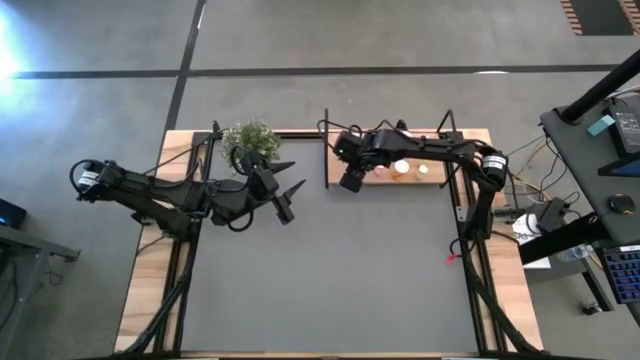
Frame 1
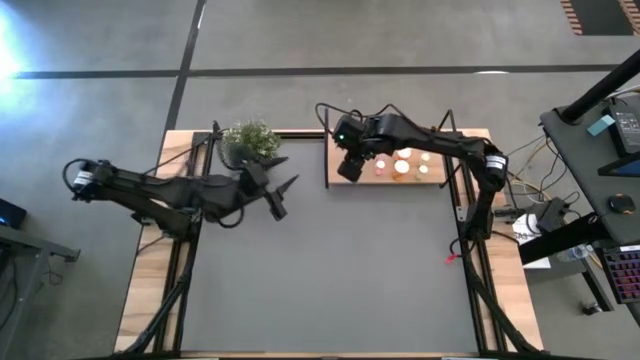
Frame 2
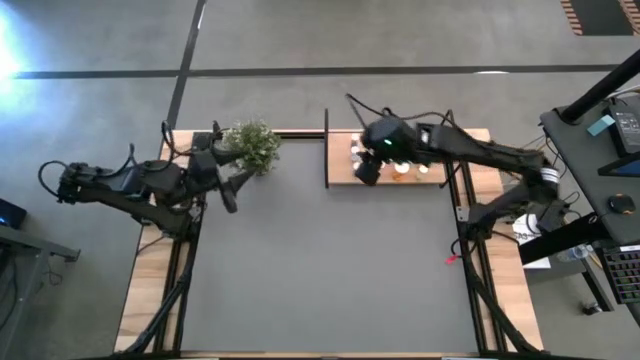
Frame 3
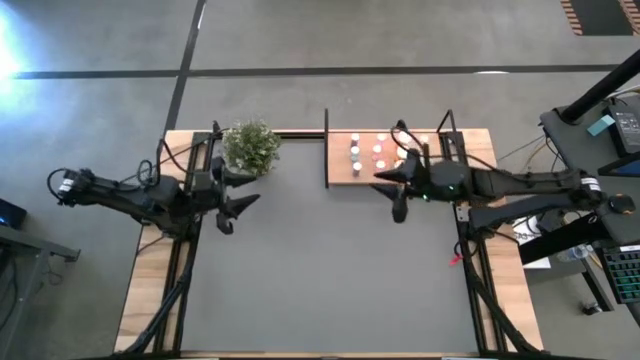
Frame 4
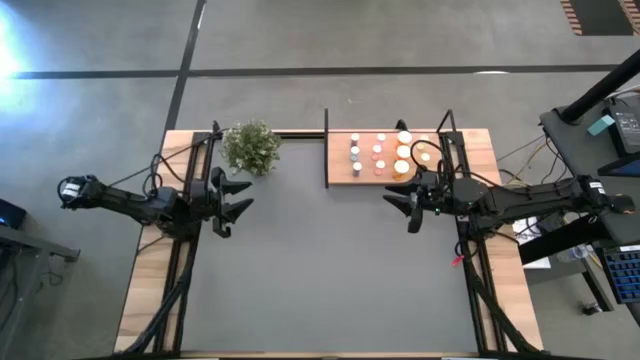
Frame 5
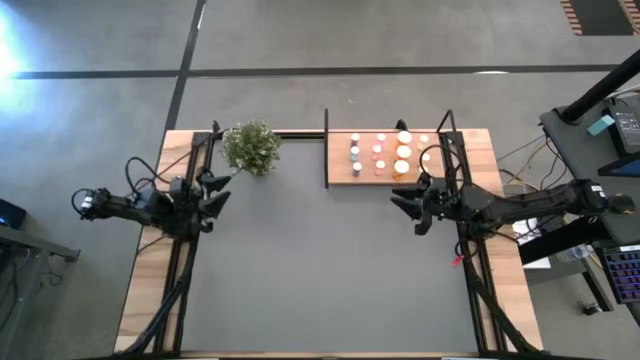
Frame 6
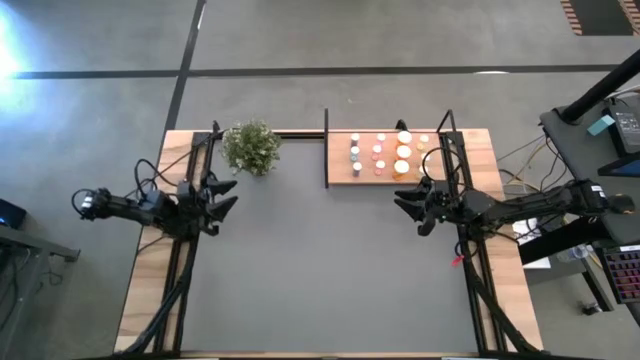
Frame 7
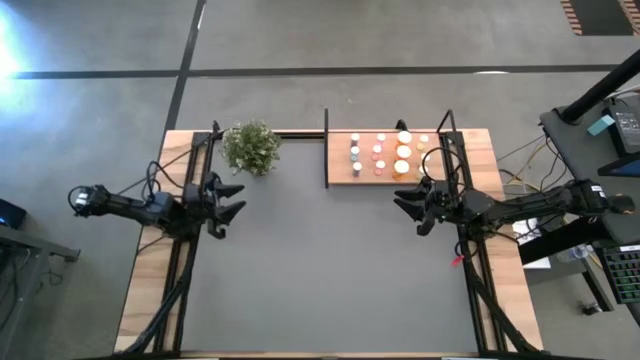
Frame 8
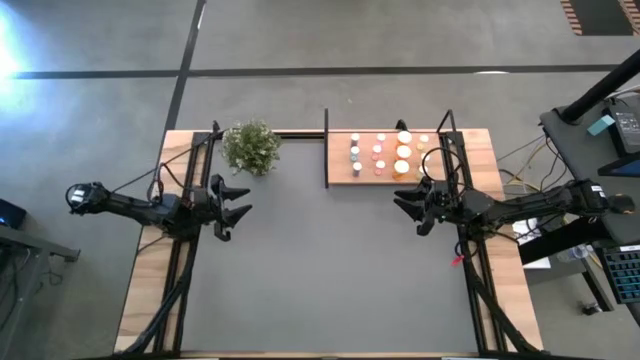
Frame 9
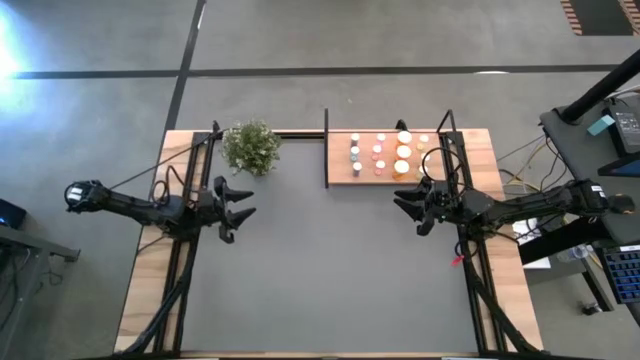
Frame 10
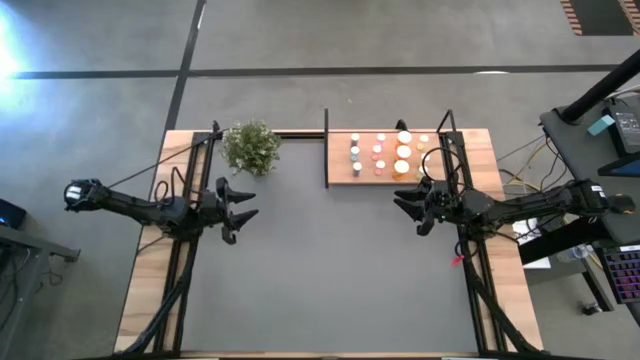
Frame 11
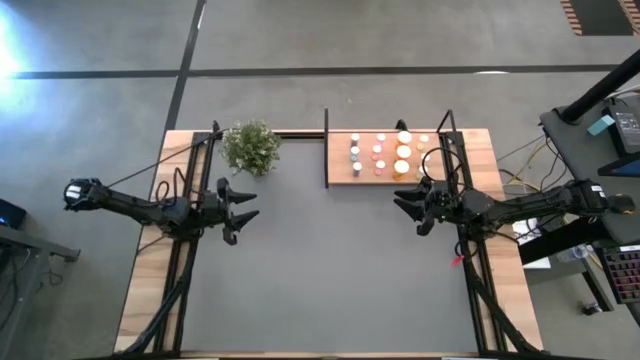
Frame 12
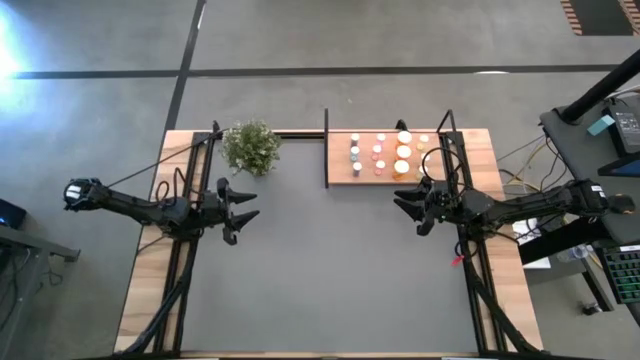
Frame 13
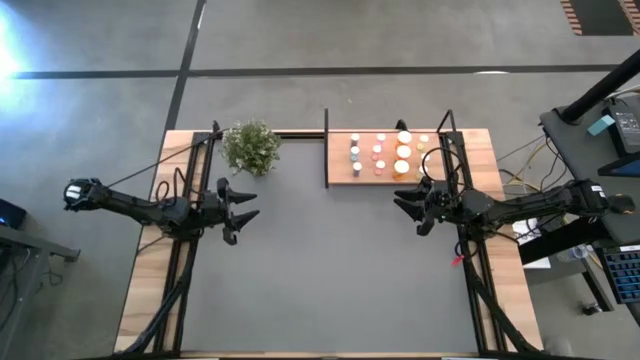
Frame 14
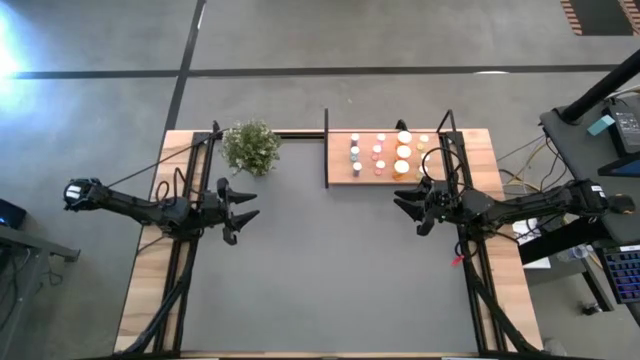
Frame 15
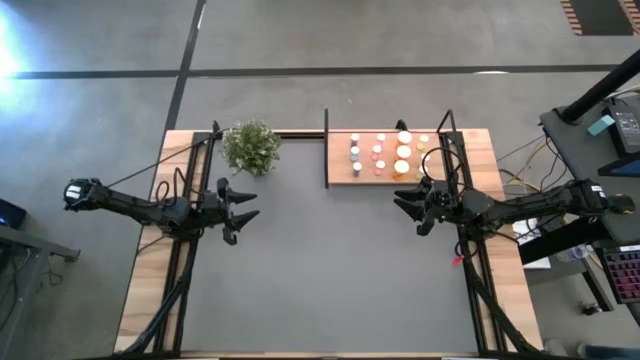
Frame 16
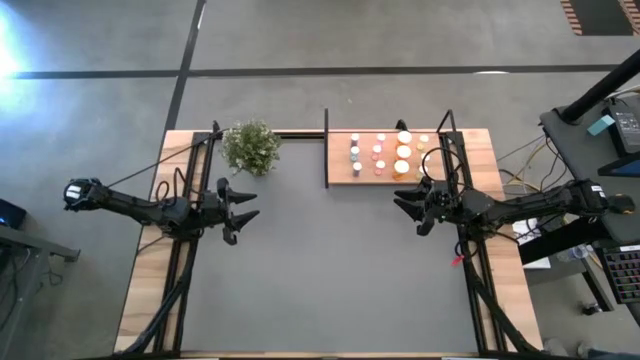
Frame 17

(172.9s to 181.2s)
Task: Pick and place medicine bottles onto shelf by color
Return to Home Position

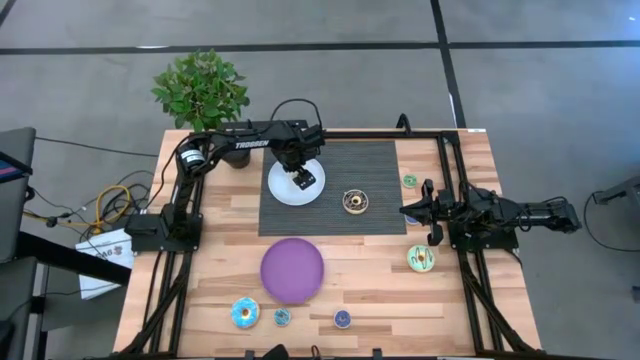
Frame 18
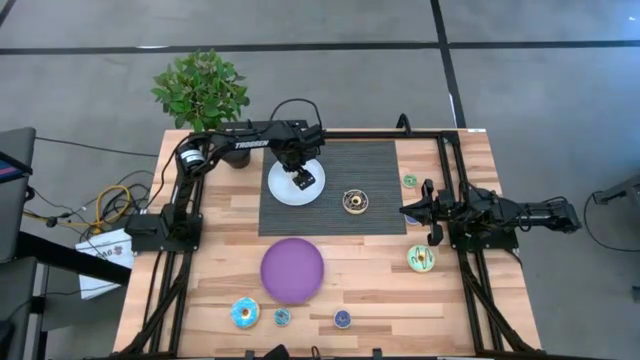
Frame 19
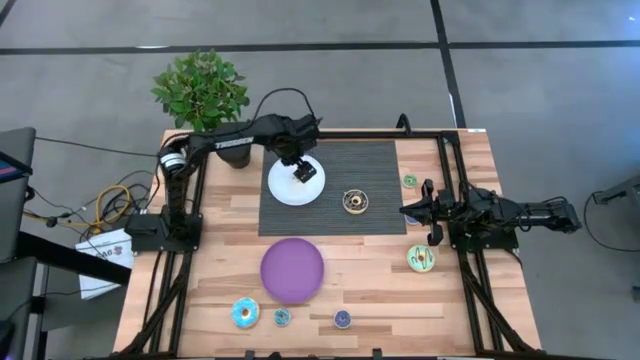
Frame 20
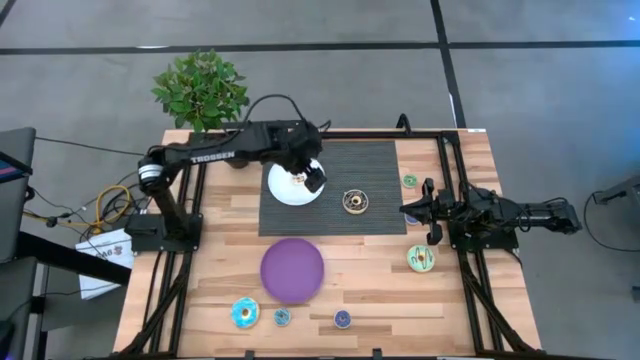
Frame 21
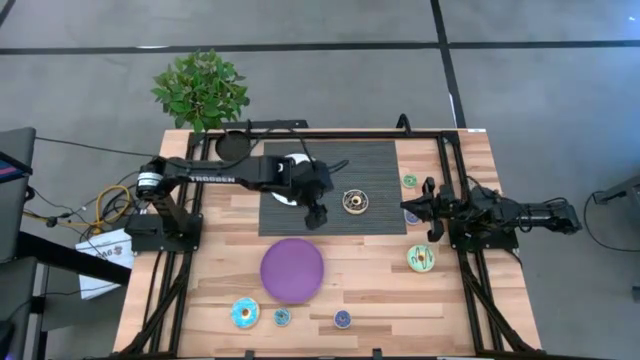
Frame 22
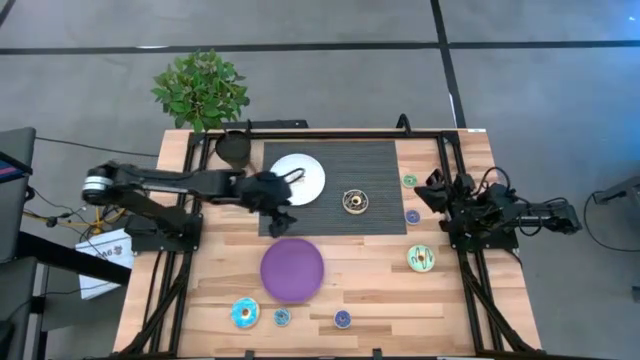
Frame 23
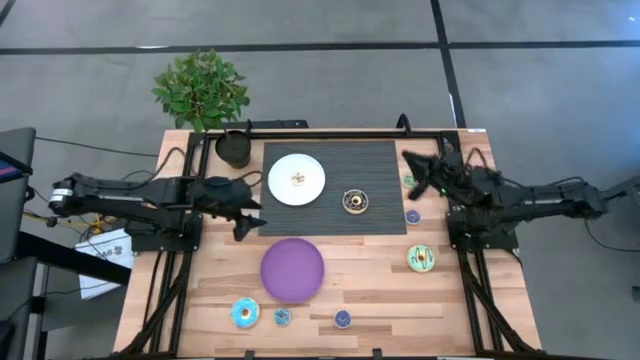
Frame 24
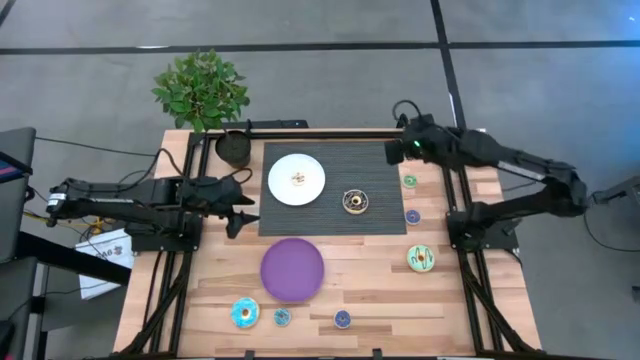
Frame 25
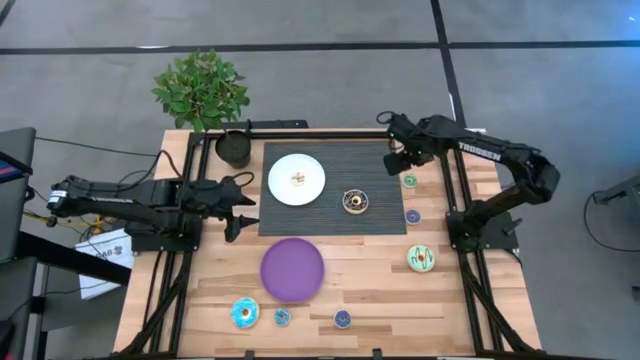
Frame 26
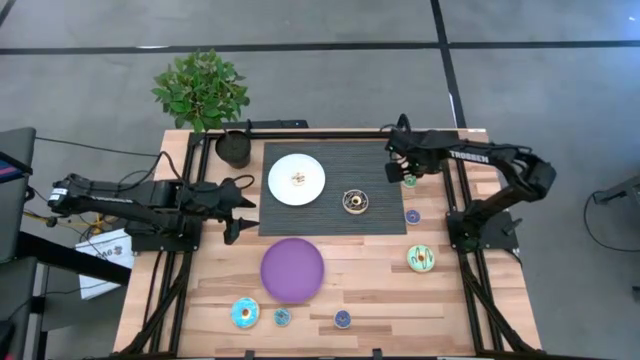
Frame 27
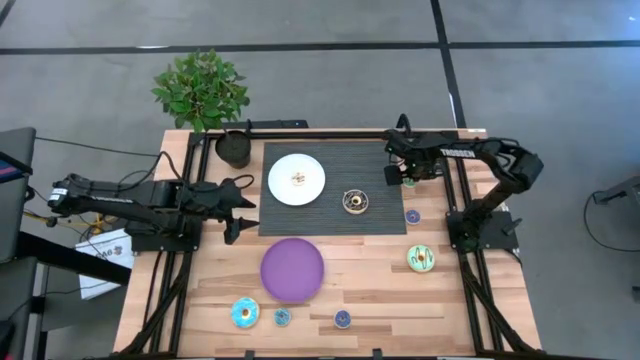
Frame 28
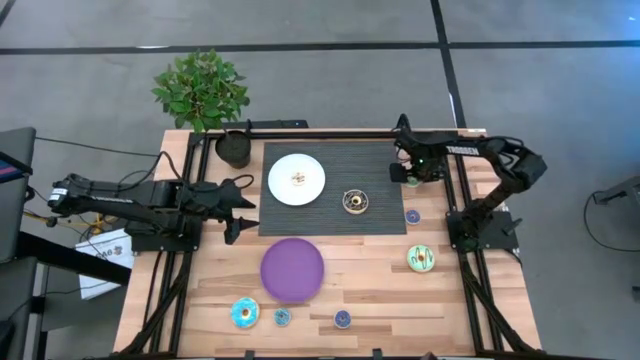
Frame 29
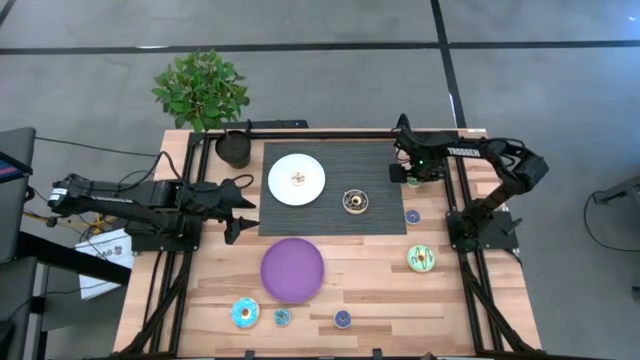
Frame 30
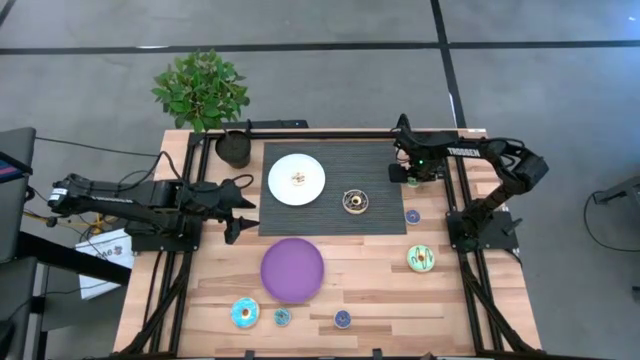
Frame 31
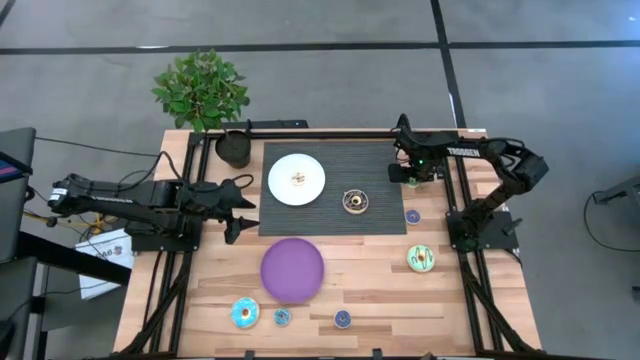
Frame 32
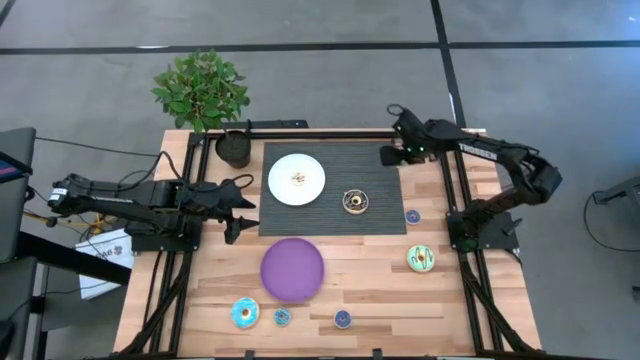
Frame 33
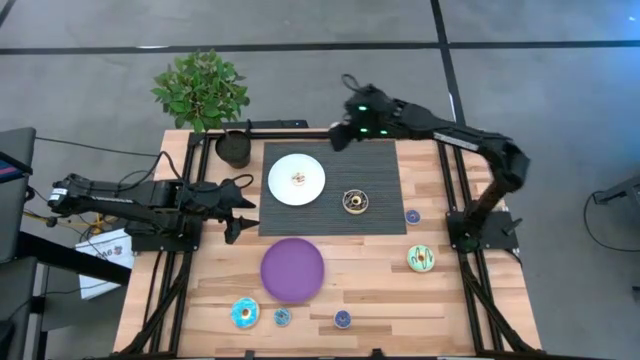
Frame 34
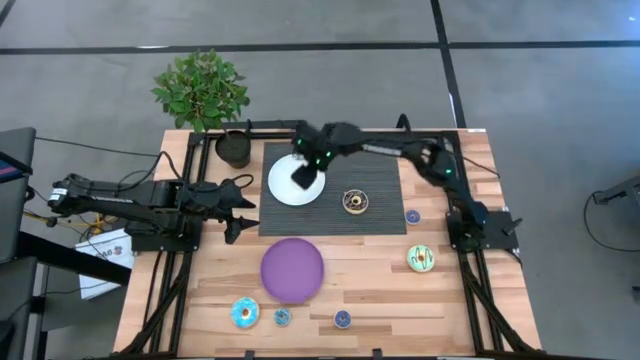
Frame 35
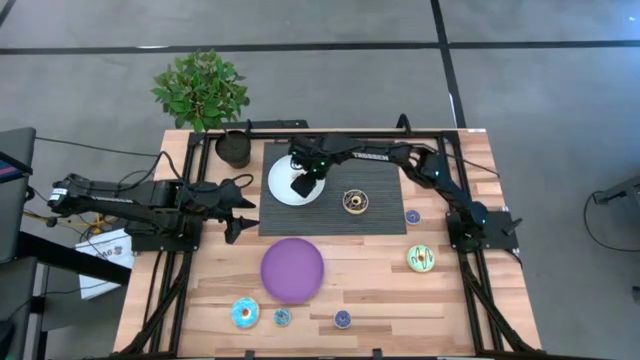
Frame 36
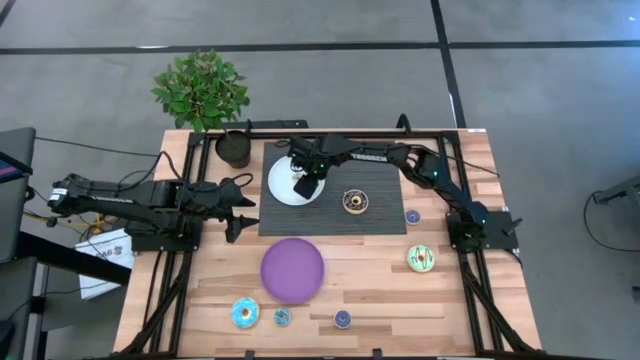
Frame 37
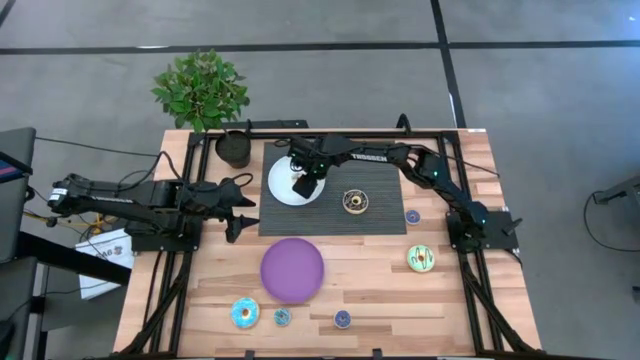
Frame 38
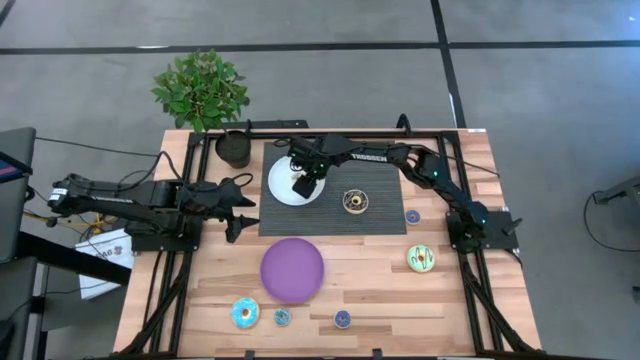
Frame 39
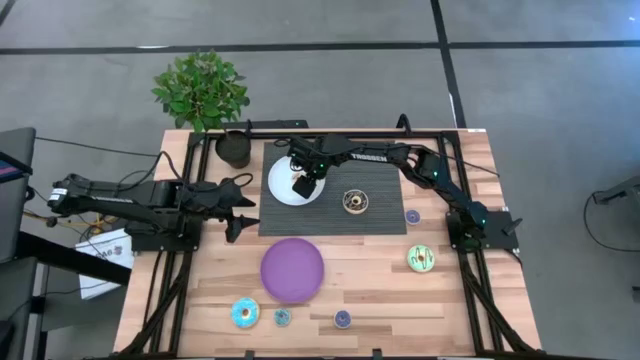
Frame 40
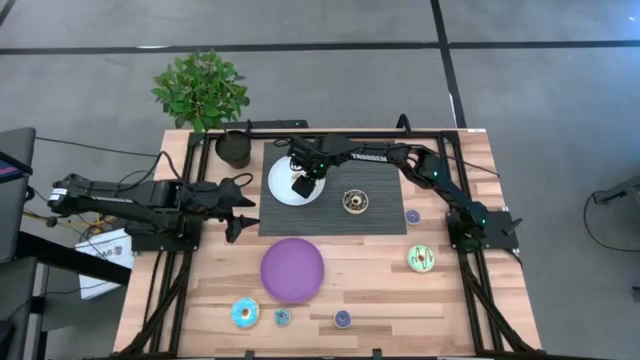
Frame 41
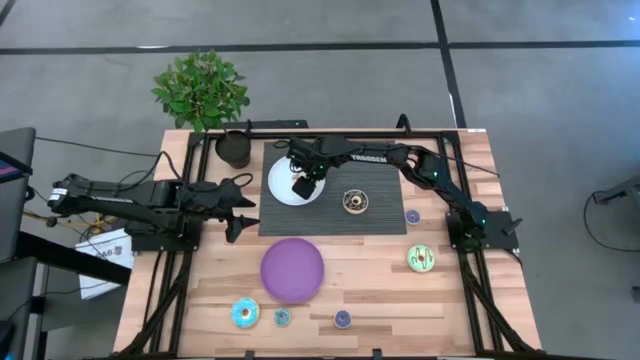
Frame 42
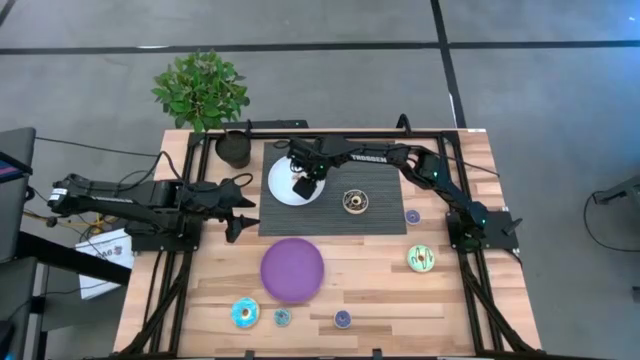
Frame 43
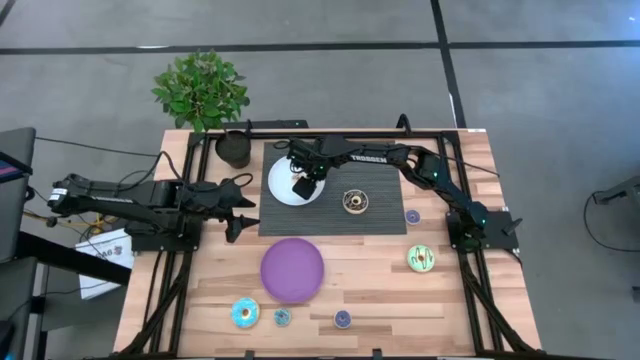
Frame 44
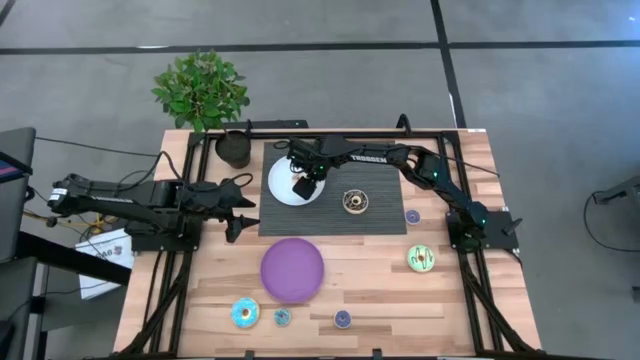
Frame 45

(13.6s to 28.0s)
Task: Pick & Place donuts
Put the small green donut on the white plate
